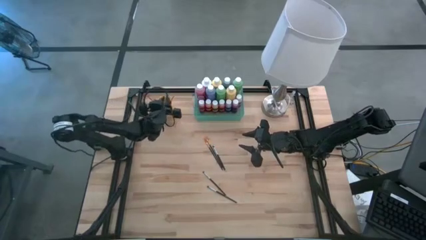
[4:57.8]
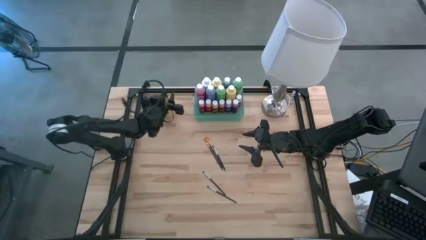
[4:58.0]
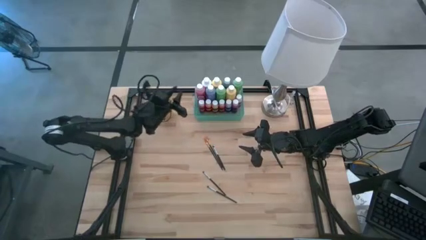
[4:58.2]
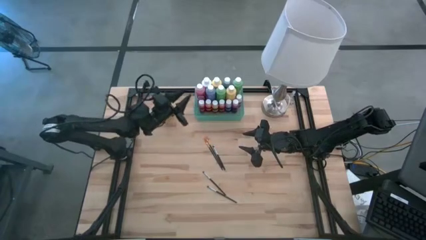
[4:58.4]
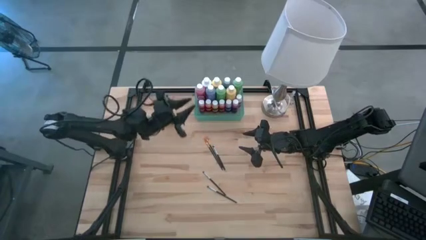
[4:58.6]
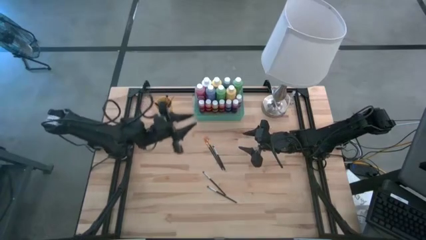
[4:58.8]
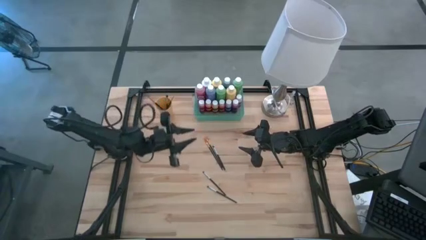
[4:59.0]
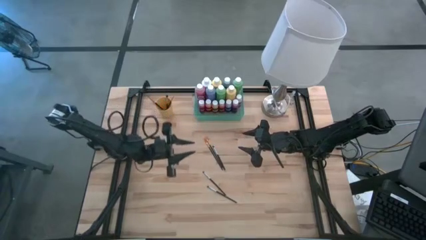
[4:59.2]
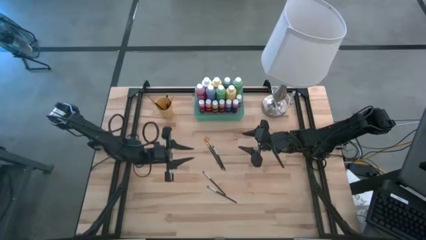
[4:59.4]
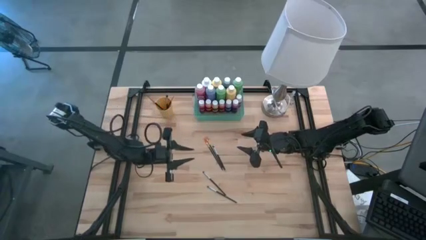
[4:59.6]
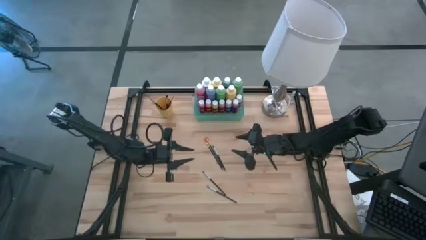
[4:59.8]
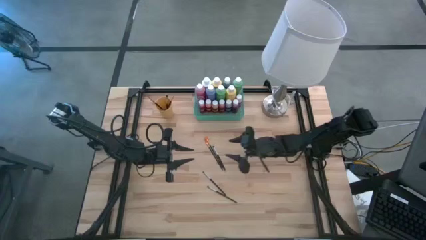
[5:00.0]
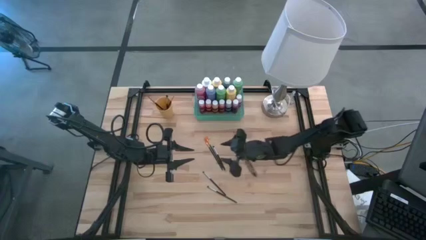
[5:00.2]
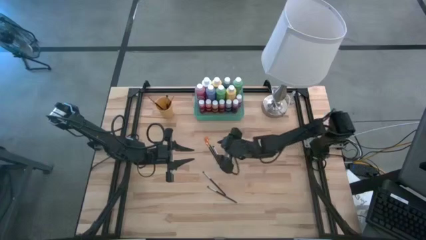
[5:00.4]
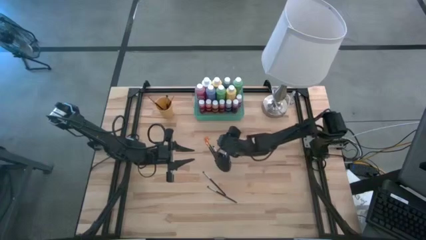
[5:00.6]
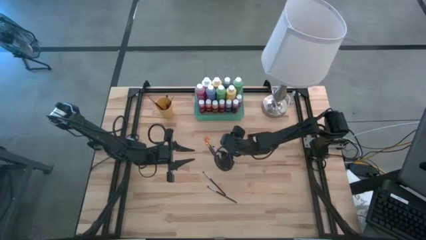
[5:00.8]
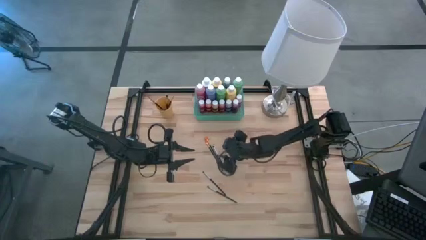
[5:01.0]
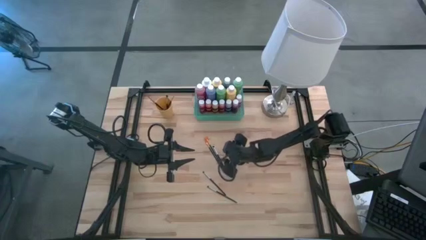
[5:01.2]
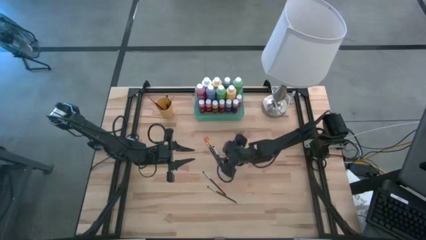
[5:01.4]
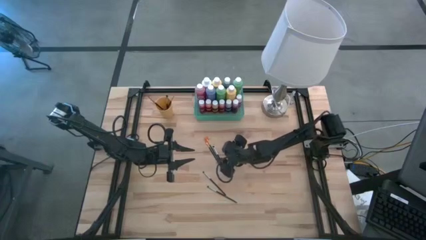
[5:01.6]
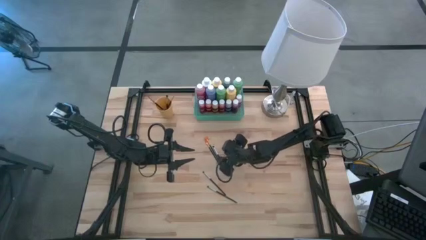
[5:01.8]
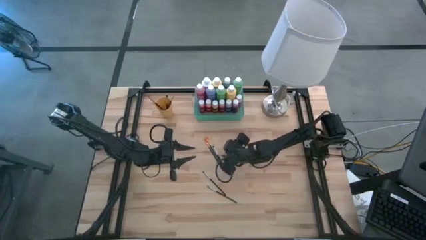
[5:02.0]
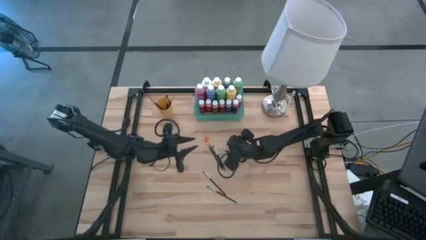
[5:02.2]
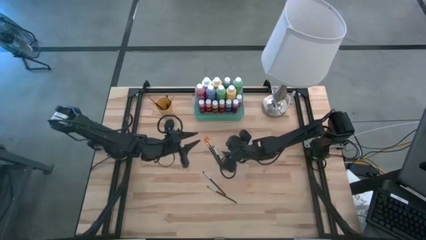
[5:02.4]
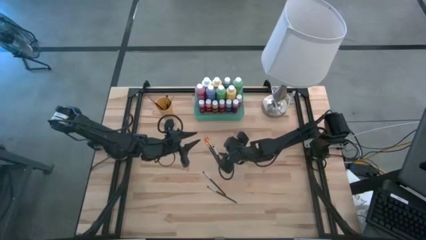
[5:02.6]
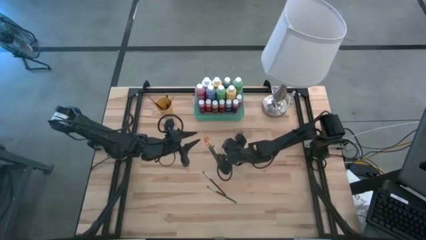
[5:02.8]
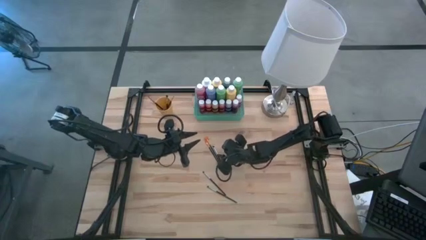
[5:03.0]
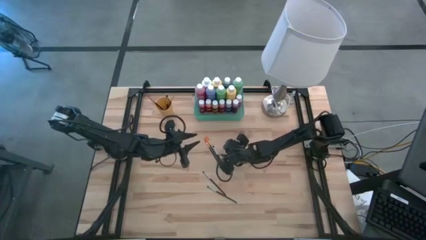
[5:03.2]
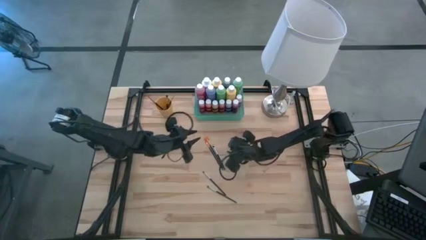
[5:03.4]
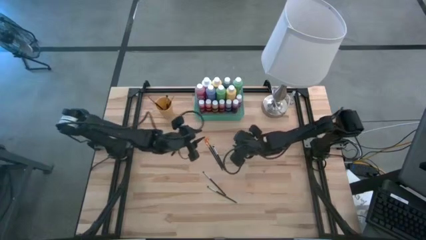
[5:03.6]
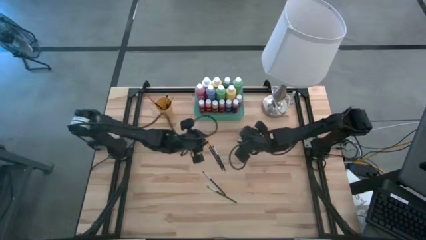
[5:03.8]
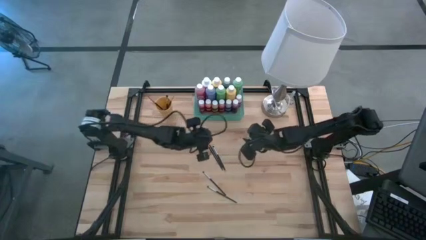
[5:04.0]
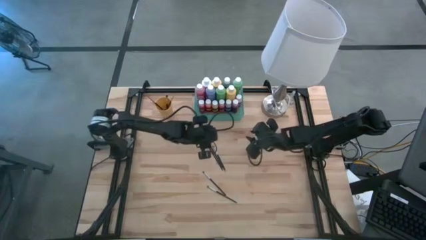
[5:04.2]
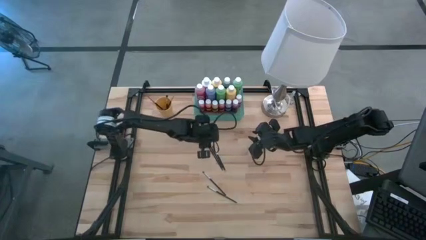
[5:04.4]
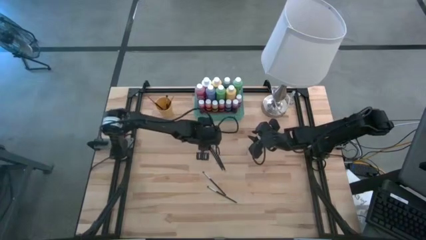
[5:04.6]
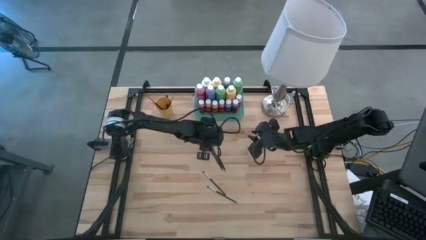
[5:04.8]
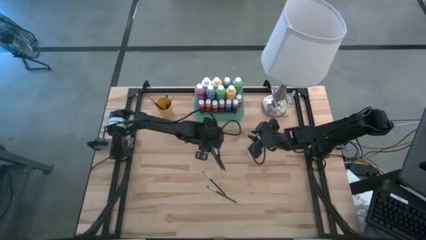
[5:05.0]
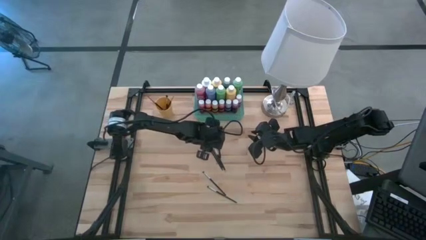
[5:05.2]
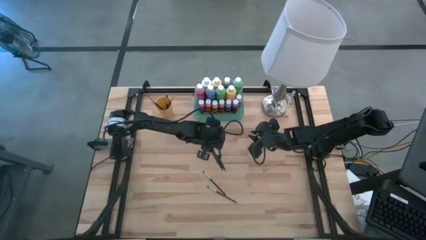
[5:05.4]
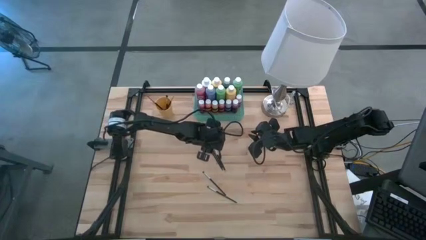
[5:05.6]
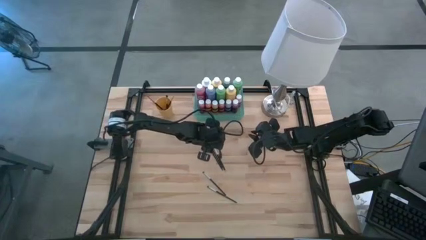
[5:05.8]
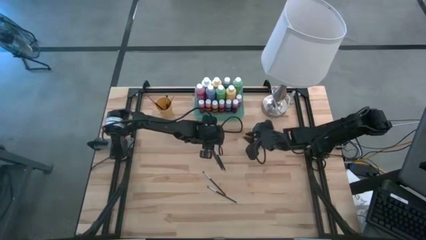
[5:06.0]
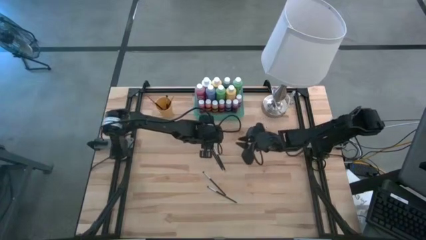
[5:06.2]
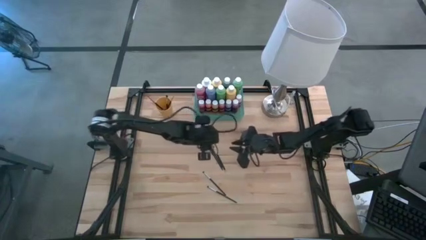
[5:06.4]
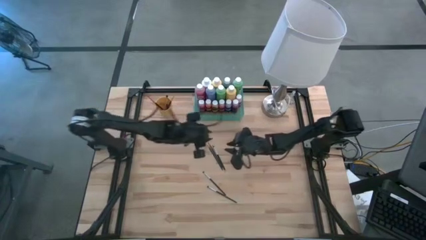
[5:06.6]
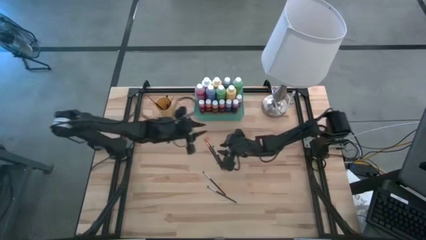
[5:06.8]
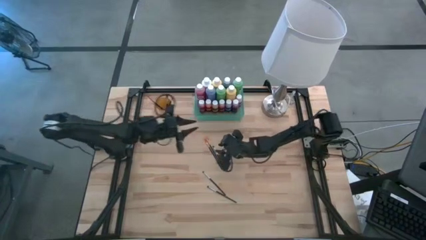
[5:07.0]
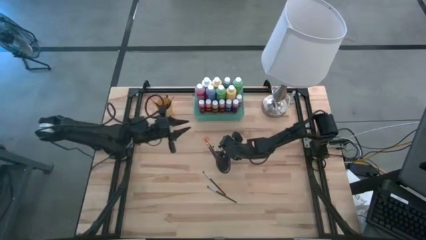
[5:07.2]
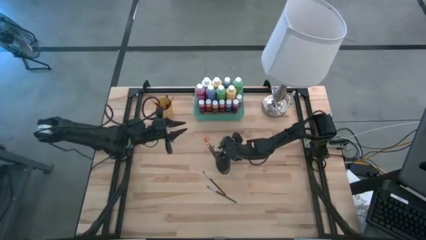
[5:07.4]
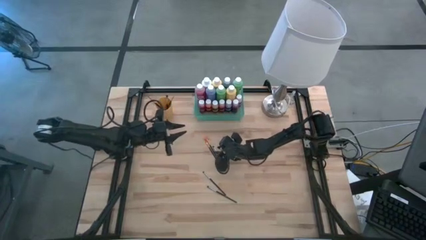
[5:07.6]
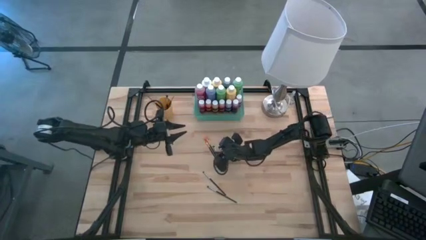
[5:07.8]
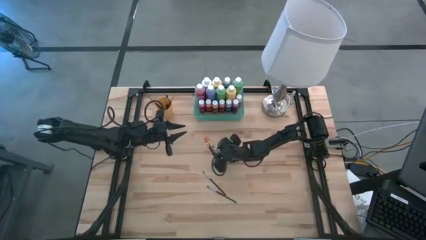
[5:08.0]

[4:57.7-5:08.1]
Task: Pick & Place Paint Supplies
Put the silver paintbrush into the orange cup

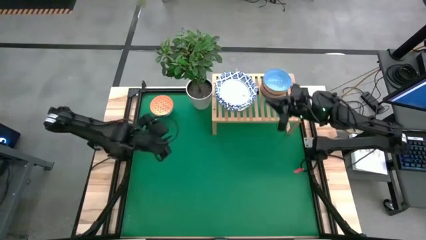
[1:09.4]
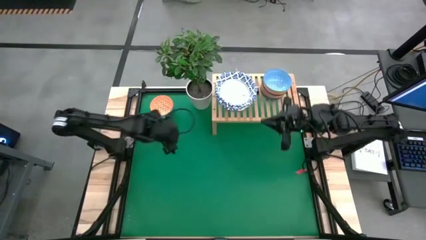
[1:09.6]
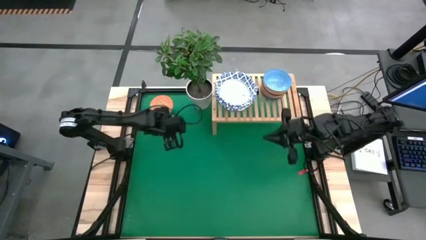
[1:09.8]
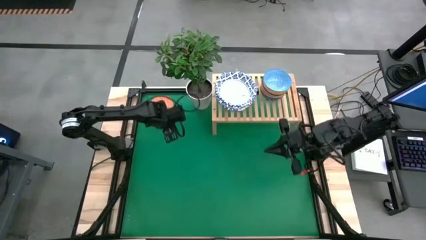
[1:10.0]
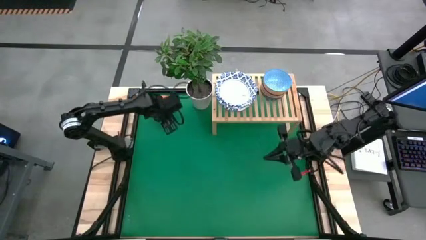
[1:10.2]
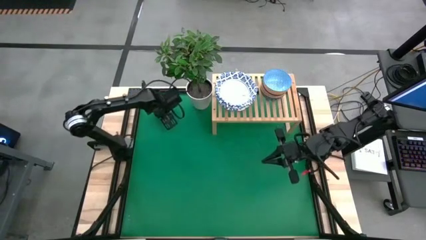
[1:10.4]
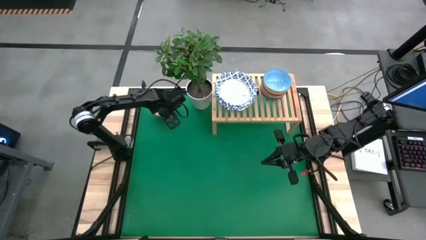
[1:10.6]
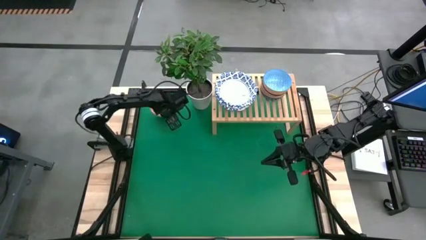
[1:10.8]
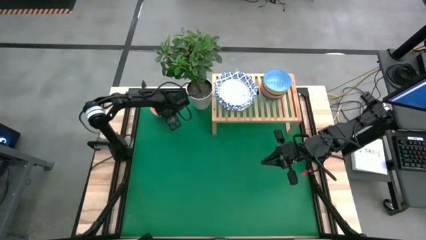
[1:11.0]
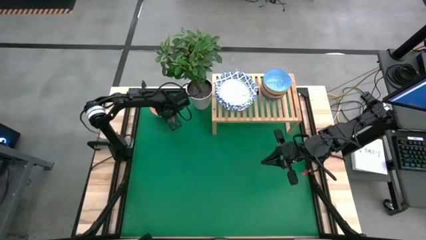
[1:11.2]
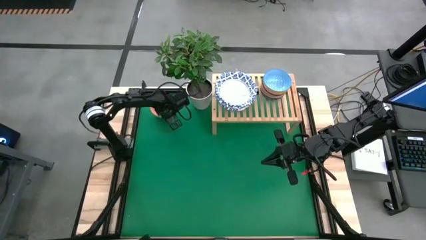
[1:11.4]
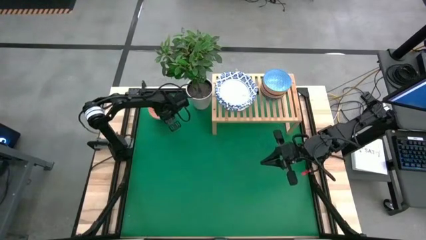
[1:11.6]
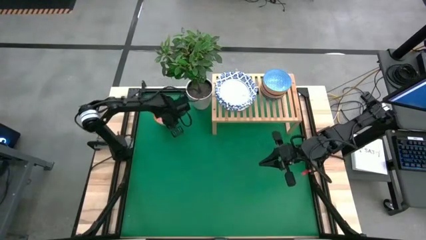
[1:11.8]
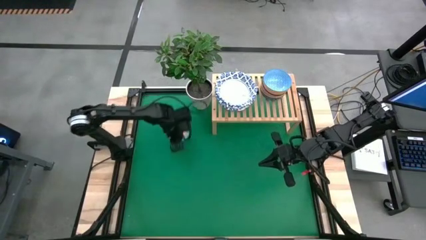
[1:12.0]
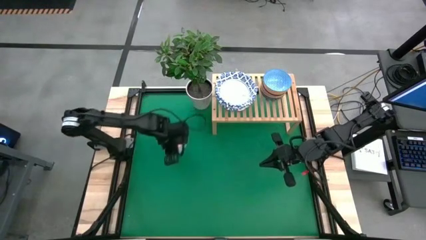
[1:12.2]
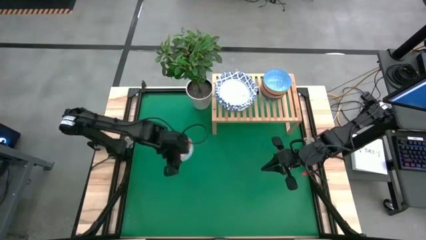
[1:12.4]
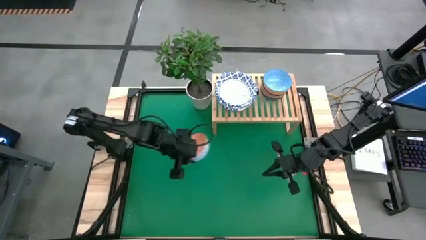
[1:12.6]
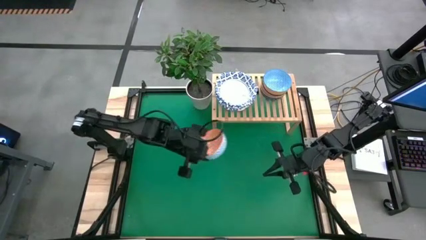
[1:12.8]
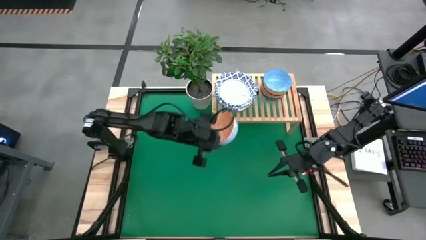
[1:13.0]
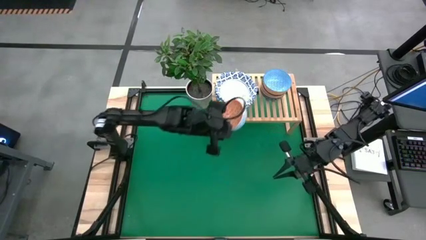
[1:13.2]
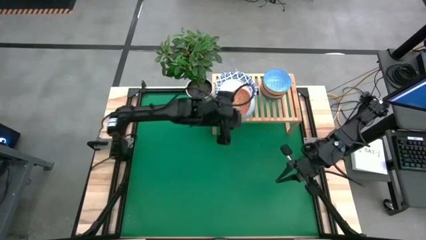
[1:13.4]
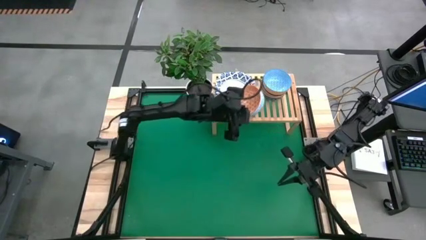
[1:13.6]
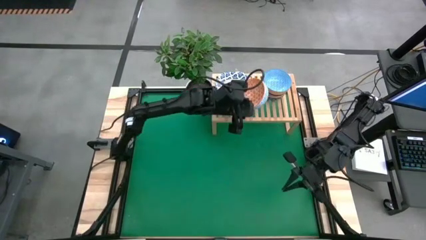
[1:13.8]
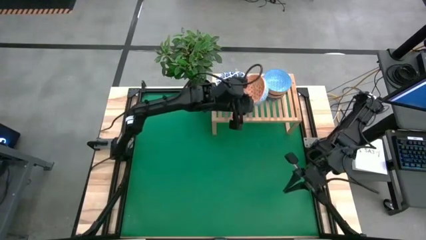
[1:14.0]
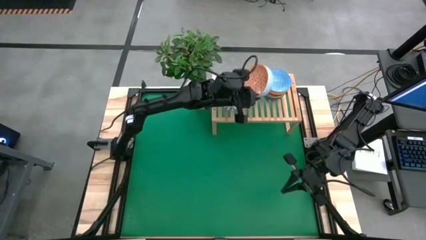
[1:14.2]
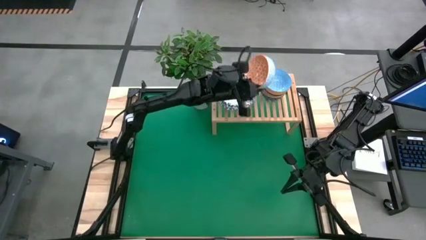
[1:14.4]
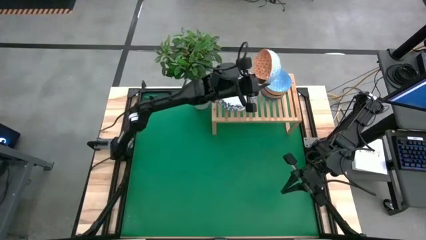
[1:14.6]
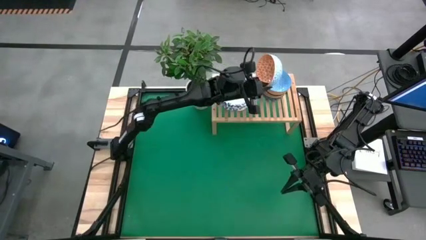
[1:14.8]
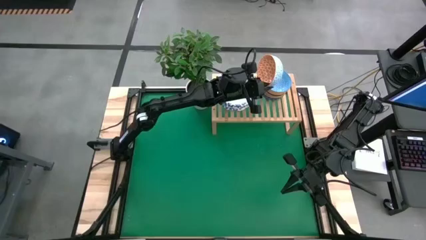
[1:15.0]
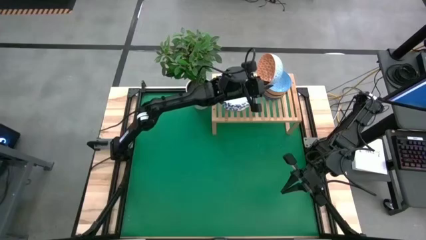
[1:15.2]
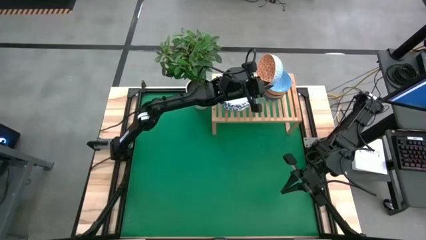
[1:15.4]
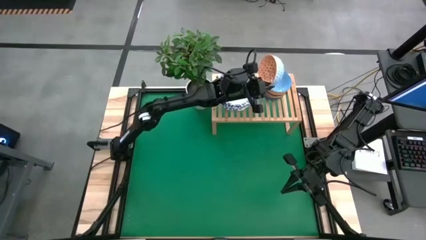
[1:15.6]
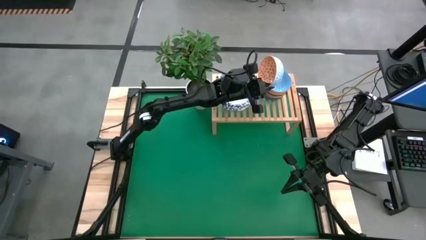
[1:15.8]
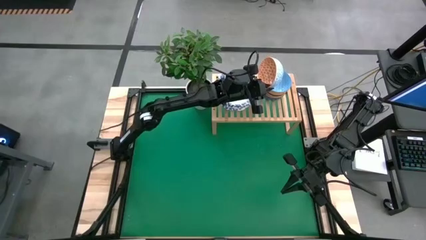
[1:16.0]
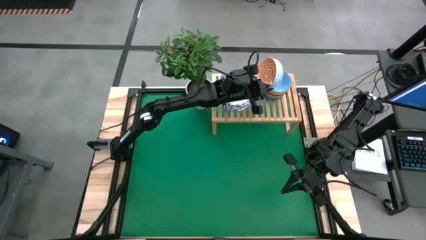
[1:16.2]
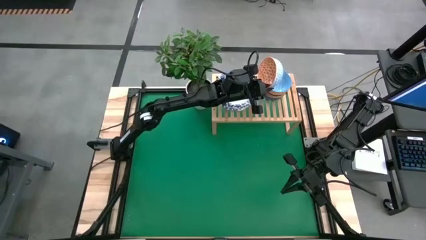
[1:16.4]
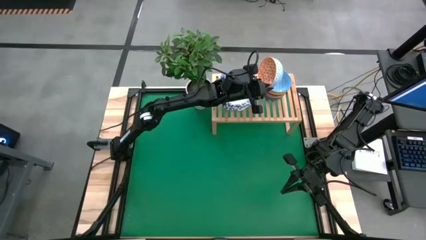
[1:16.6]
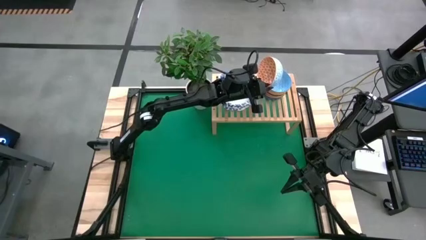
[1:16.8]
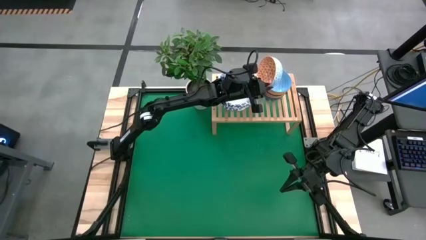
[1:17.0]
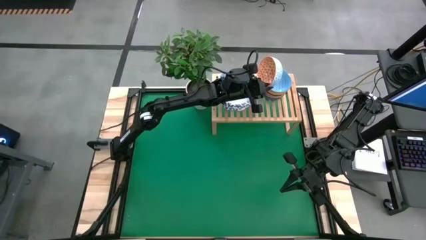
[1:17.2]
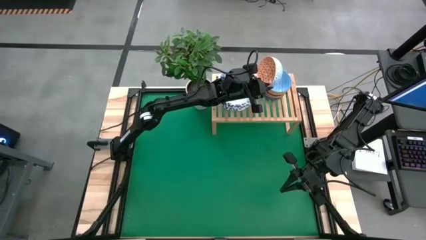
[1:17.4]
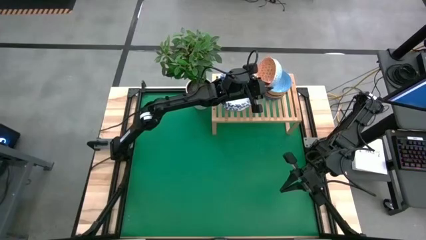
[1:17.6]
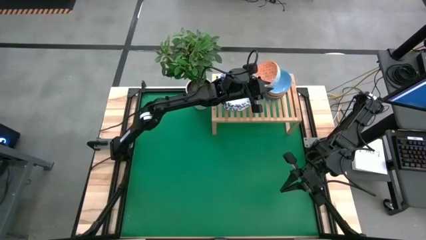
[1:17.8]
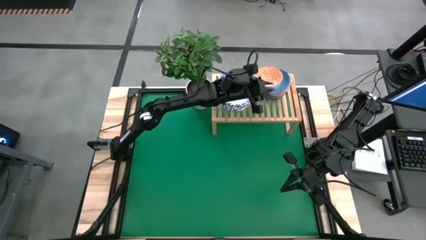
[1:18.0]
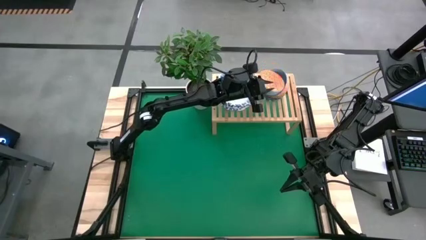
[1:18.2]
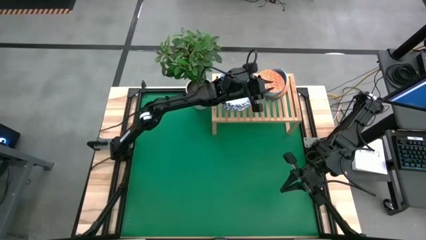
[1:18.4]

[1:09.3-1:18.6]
Task: Place and stack bowls onto a shelf
Stack the orange bowl on top of the light blue bowl on the shelf
